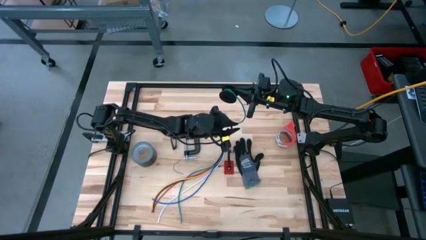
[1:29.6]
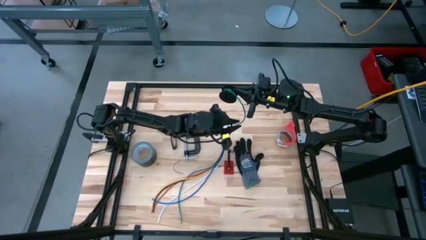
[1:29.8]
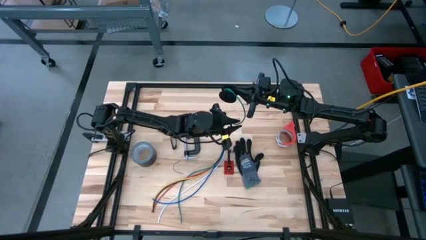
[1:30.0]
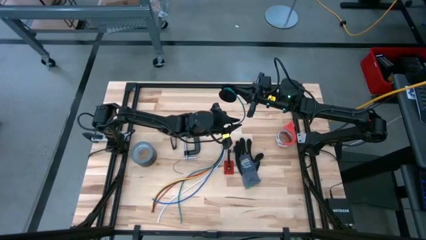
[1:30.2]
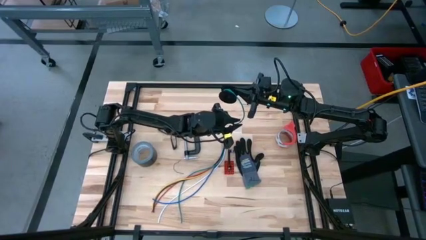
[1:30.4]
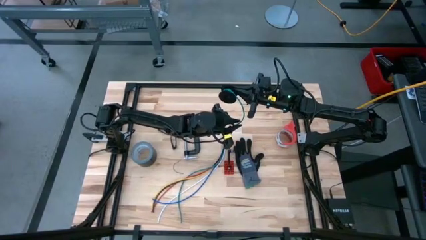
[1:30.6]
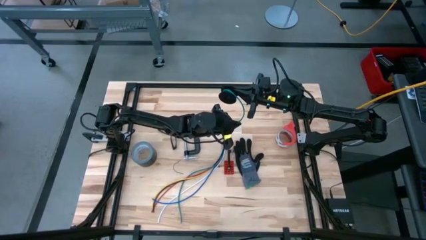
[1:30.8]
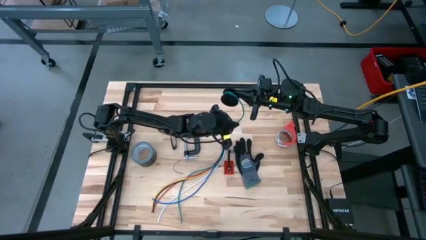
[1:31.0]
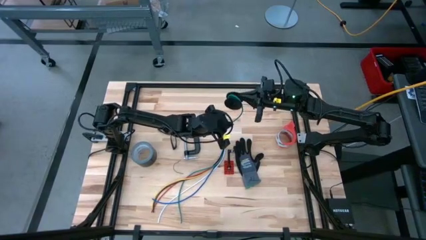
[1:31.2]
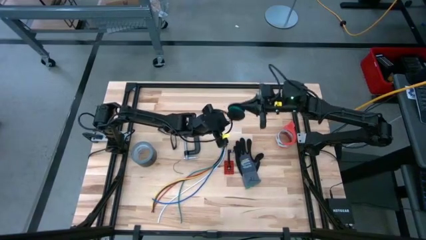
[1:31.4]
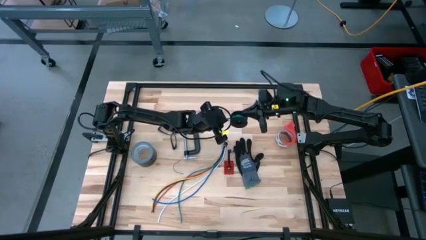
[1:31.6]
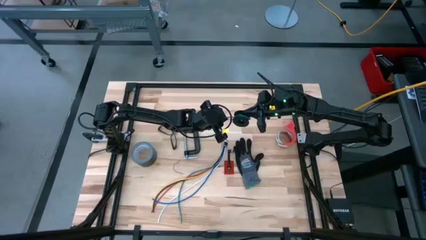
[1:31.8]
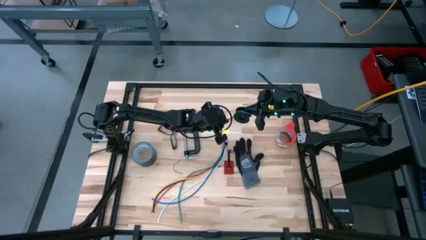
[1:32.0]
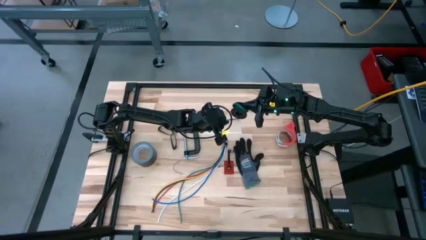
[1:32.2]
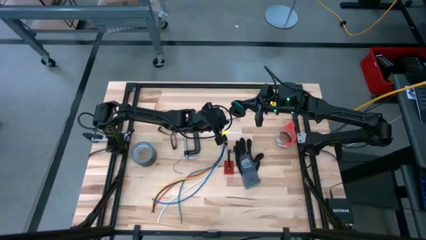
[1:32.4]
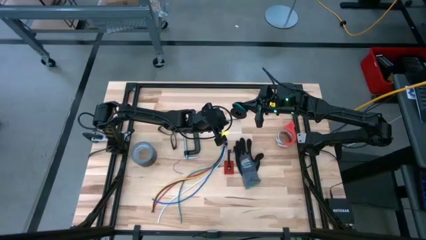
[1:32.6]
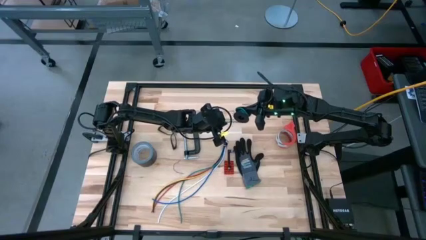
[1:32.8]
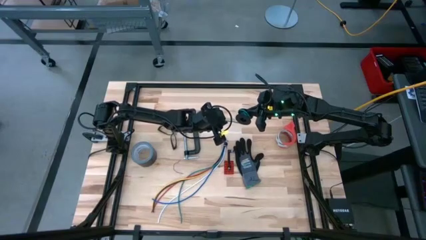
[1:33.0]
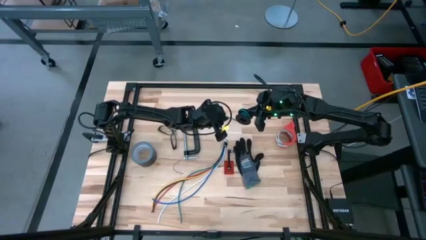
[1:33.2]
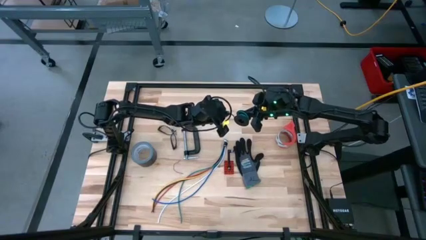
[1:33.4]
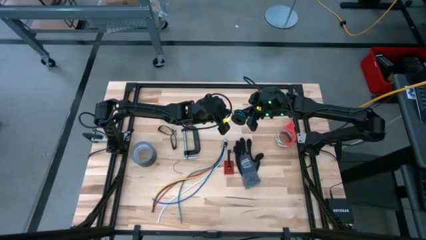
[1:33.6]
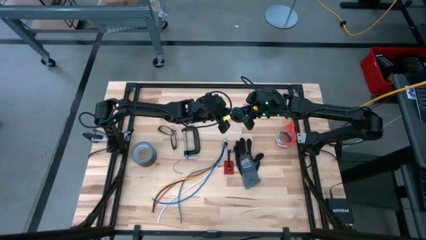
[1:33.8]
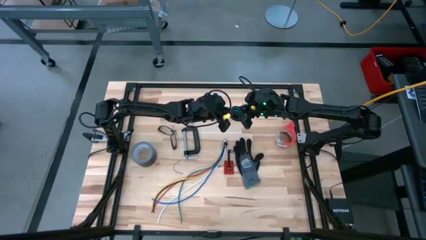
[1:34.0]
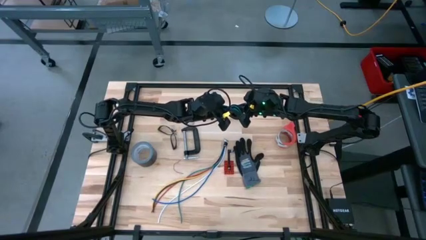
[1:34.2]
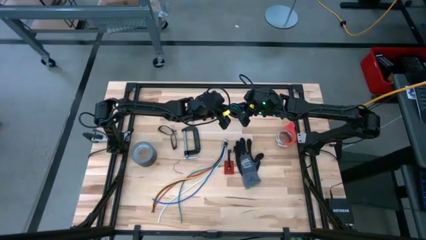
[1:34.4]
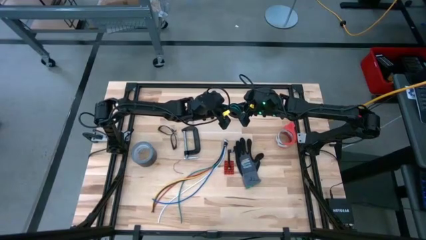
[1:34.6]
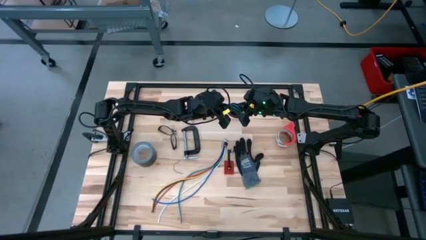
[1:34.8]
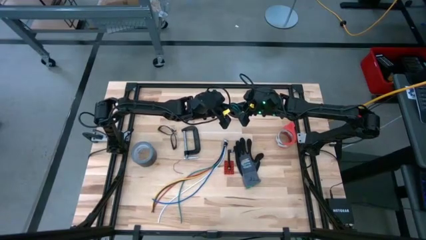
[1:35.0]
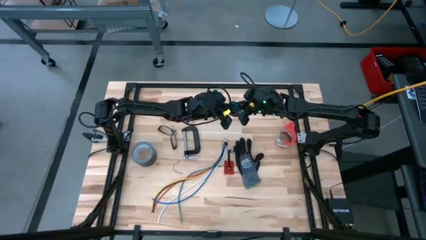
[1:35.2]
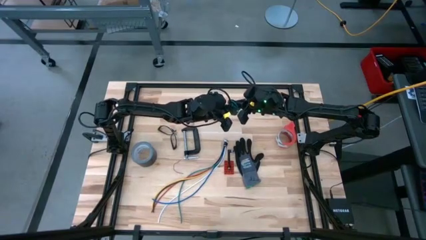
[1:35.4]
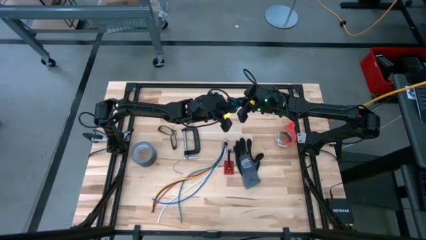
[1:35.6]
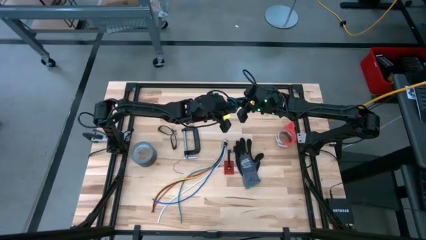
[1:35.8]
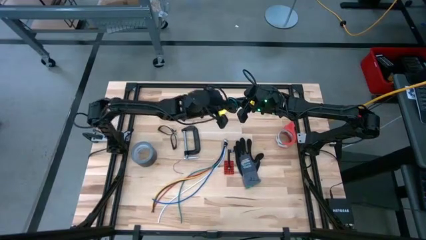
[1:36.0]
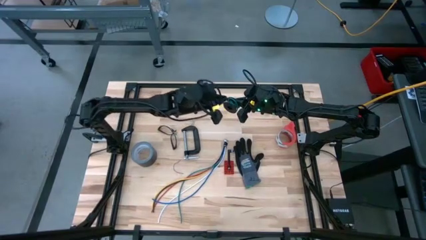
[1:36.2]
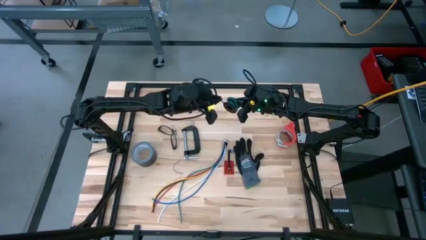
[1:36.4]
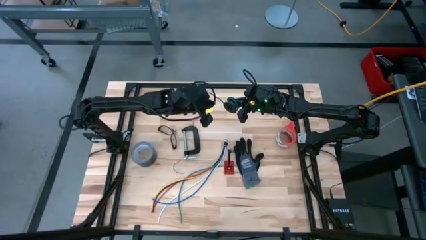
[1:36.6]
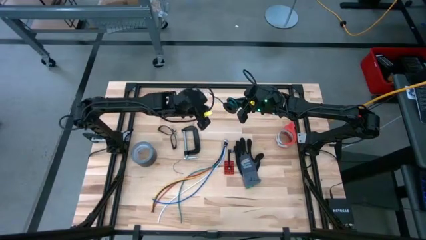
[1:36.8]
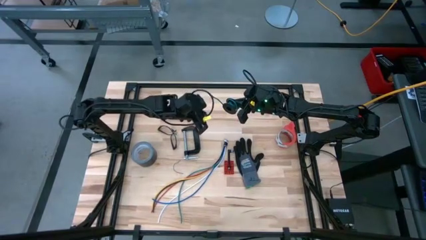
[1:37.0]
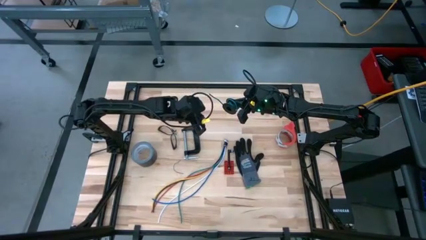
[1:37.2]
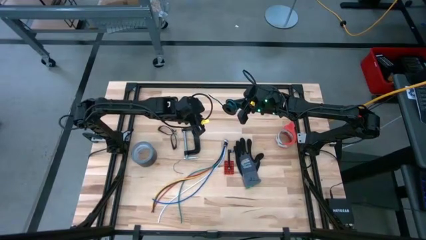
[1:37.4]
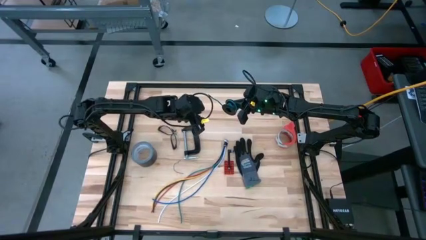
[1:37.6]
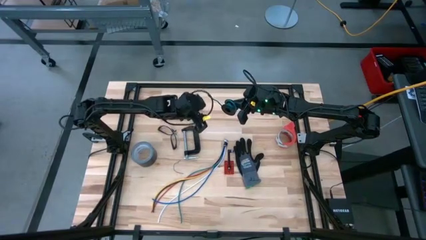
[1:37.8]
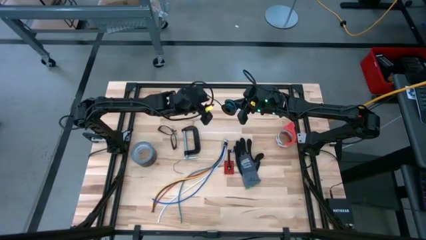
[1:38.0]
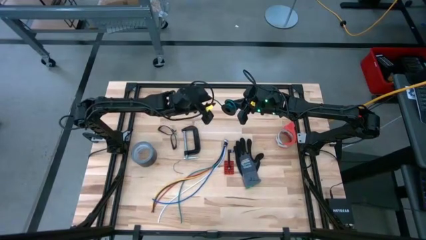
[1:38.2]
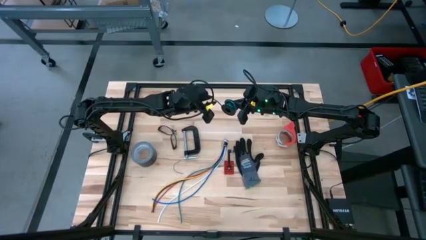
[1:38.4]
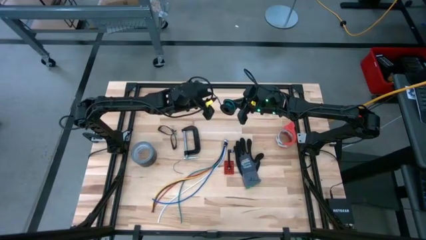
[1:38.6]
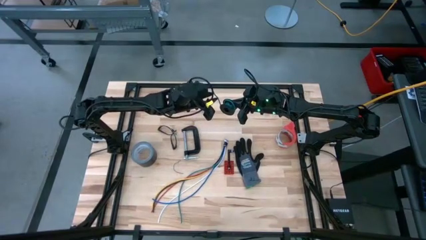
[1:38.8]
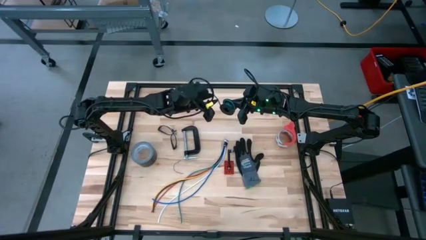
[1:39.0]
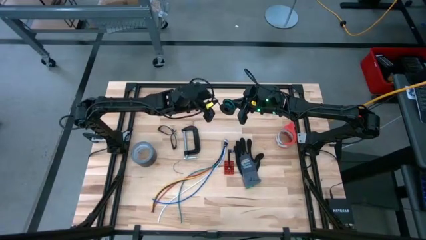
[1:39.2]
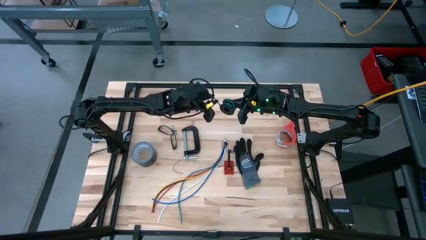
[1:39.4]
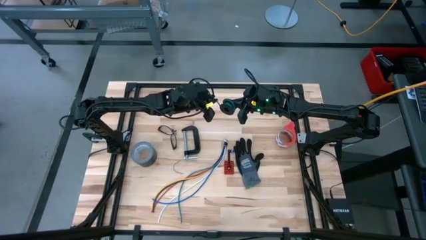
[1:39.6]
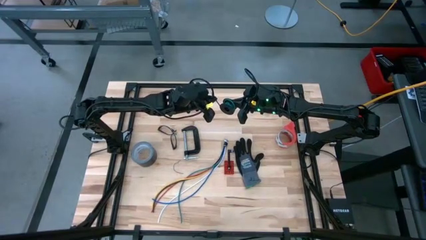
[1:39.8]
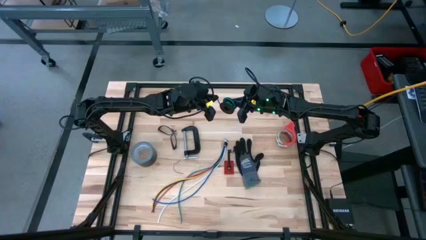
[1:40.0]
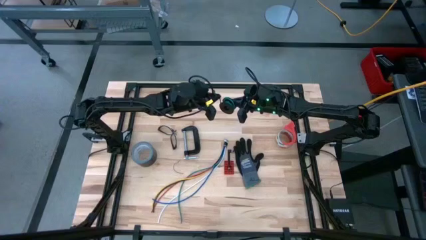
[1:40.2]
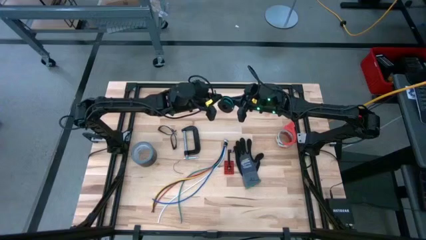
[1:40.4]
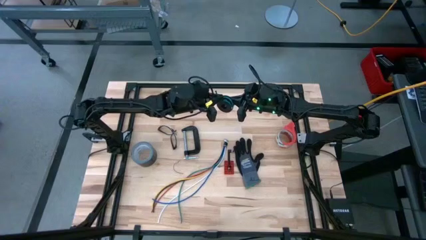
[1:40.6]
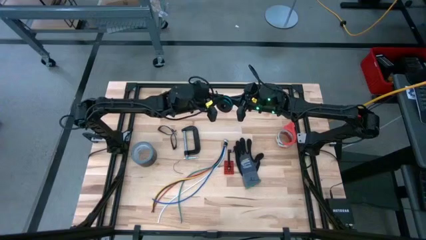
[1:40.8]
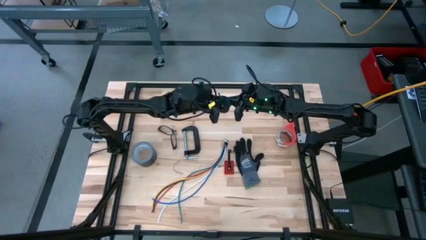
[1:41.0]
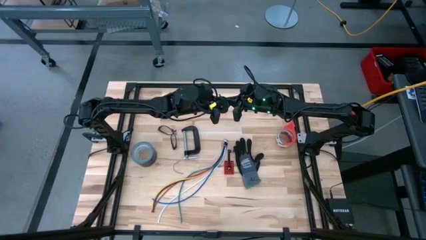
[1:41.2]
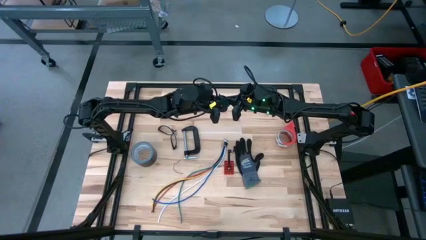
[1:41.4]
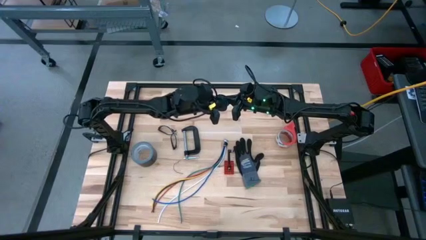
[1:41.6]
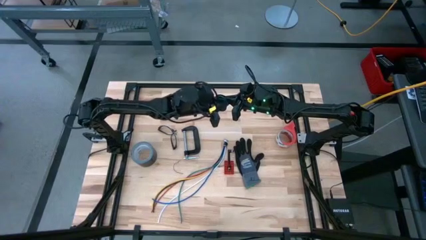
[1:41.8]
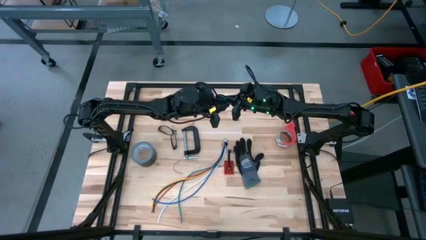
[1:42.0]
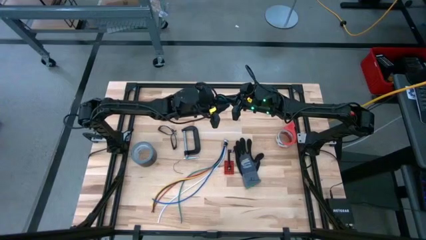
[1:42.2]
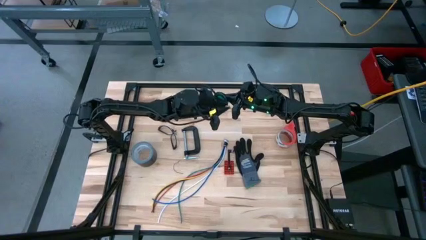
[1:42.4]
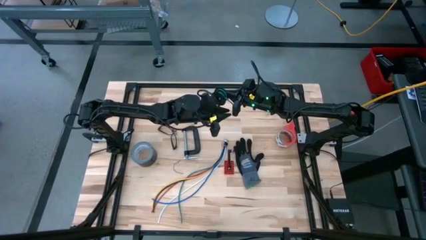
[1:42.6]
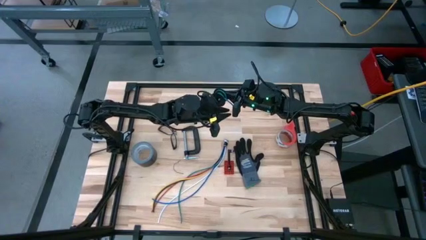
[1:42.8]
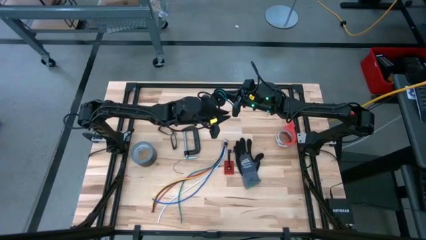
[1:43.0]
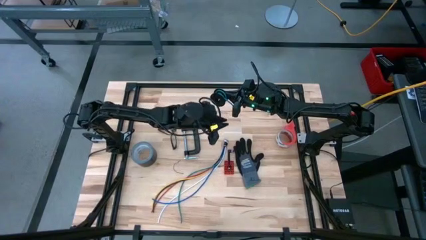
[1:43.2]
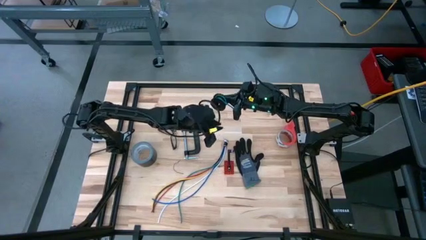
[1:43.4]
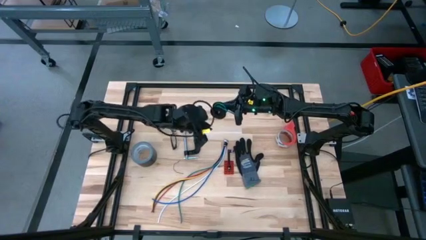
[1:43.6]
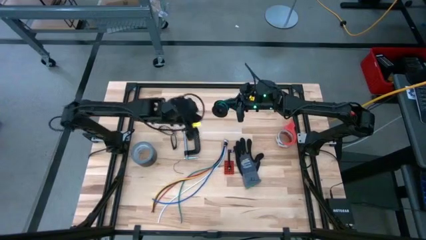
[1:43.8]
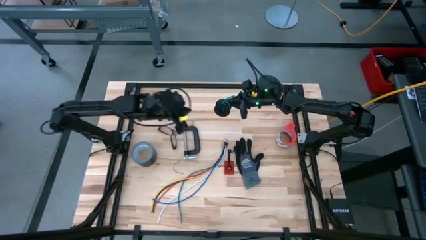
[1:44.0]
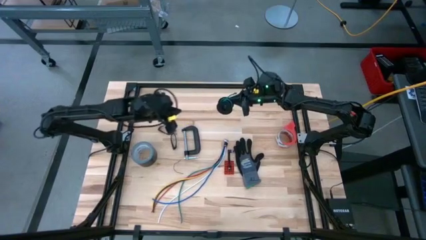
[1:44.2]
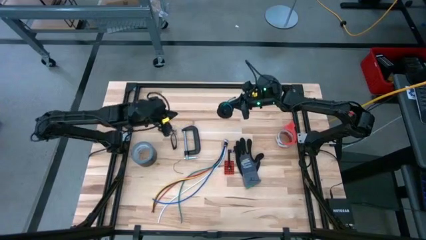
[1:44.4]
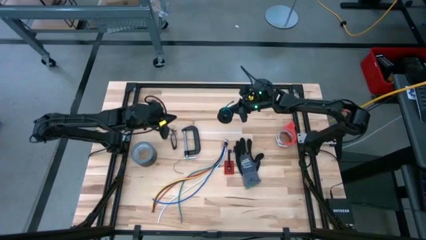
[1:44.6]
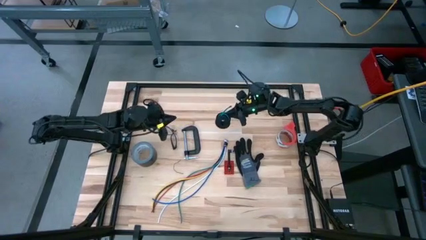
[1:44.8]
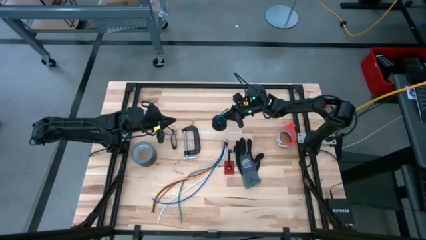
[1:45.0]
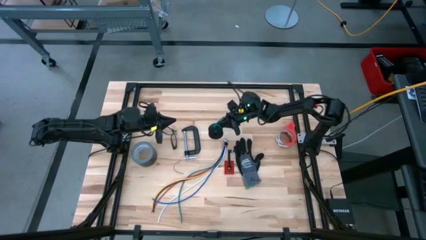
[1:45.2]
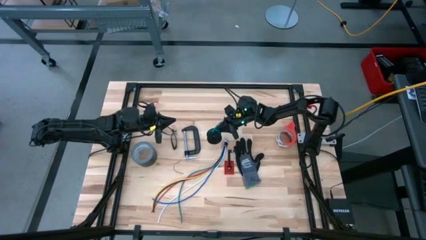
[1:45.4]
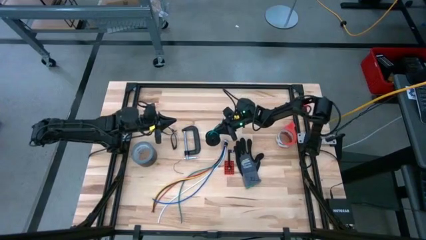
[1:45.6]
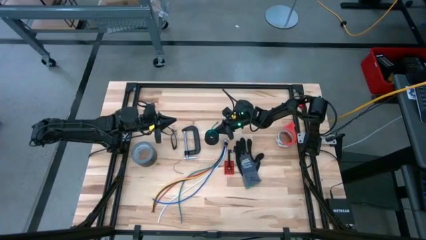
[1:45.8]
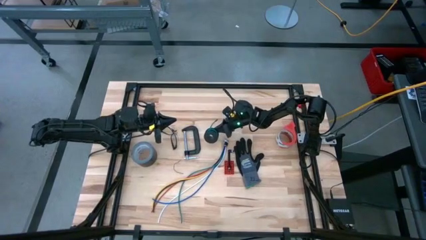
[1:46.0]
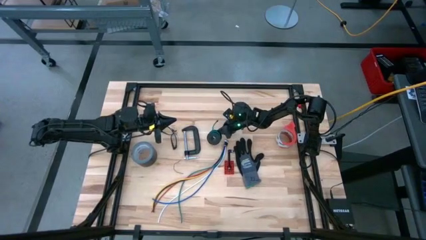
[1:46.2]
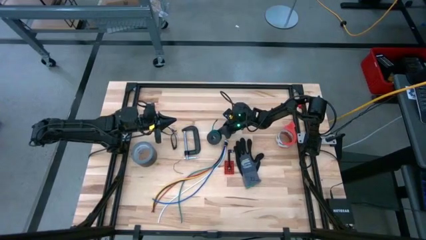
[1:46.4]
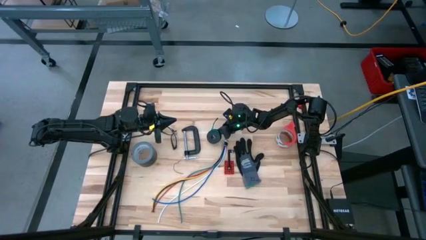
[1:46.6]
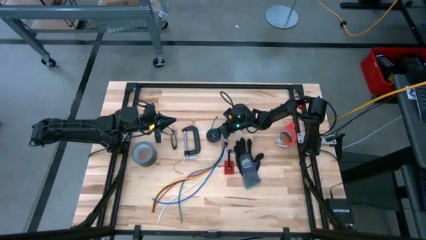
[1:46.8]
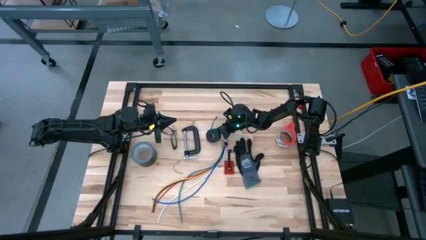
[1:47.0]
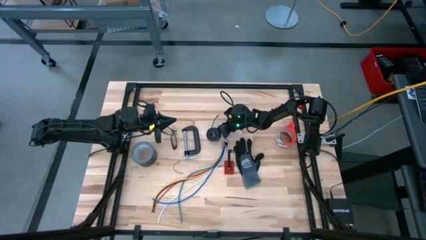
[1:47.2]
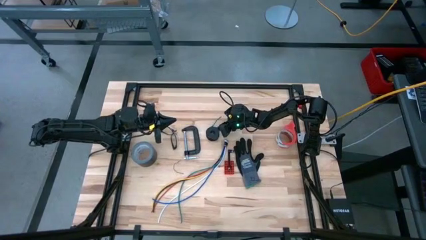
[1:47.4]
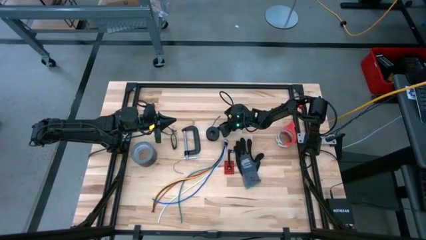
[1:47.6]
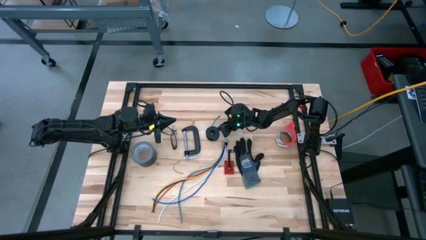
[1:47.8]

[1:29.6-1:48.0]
Task: Coil cords
Coil the green wire on the spool
